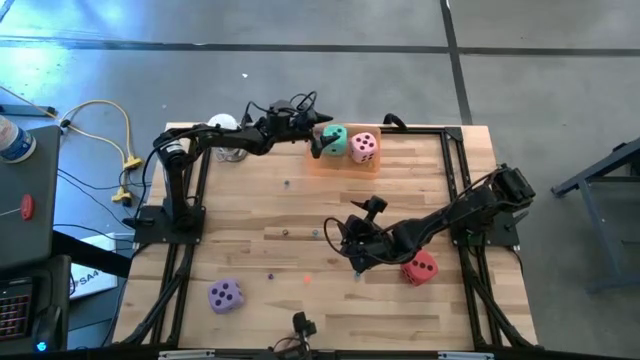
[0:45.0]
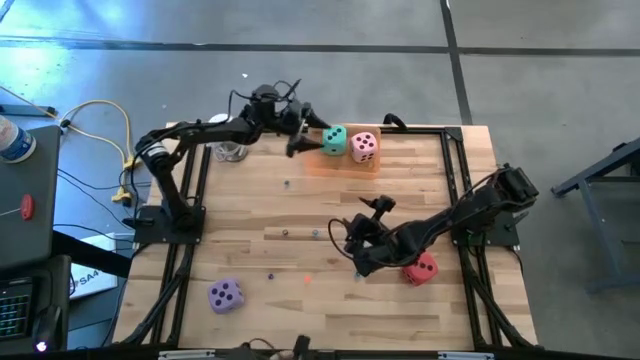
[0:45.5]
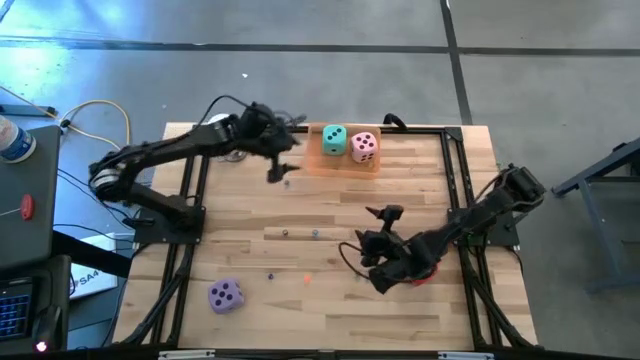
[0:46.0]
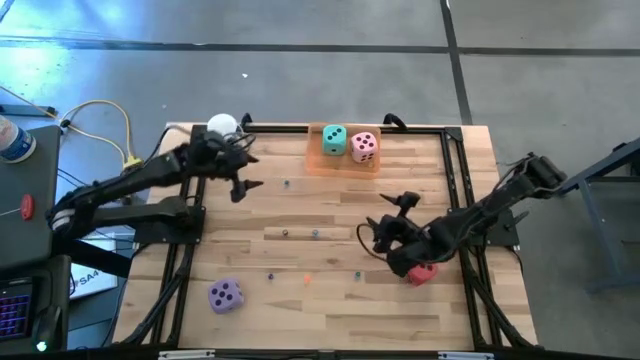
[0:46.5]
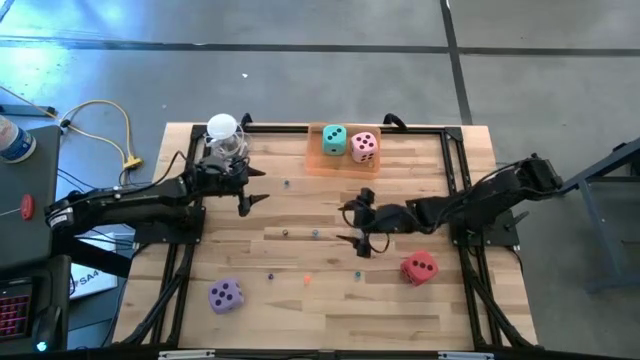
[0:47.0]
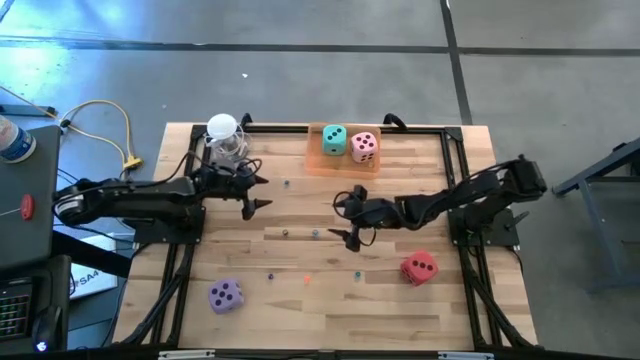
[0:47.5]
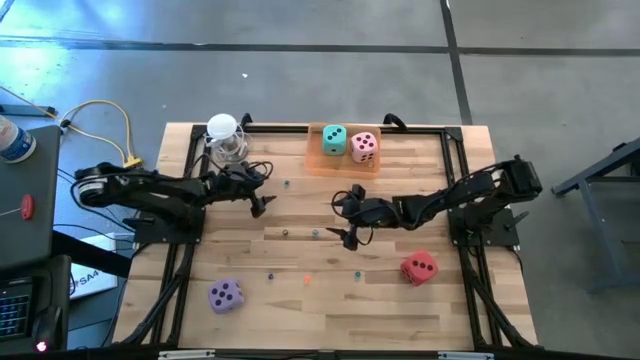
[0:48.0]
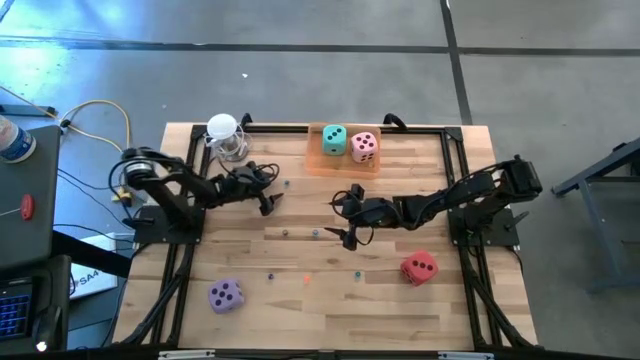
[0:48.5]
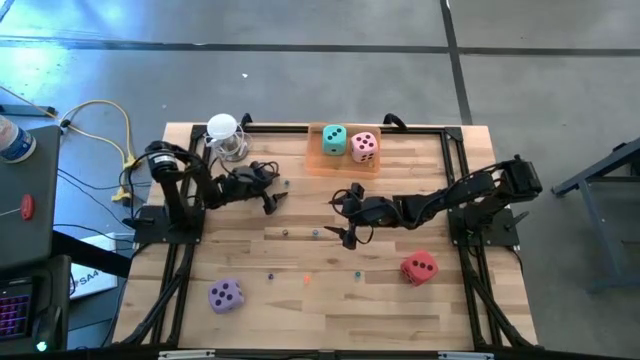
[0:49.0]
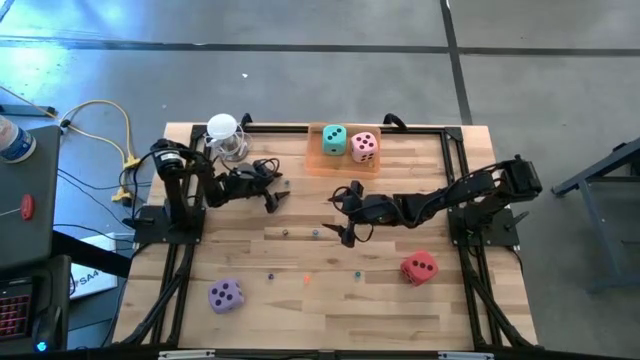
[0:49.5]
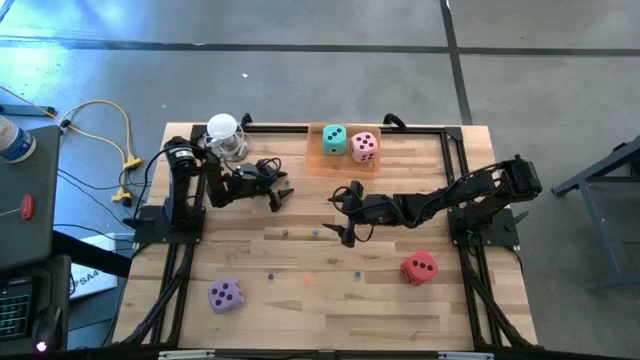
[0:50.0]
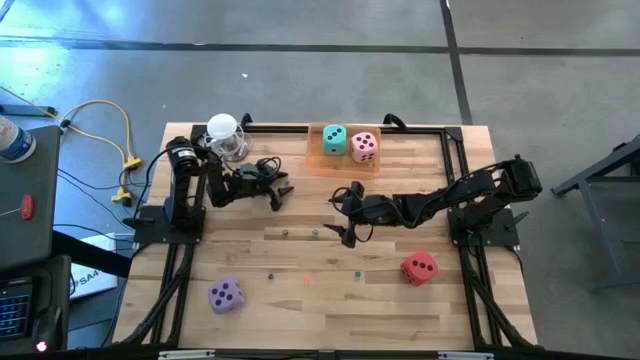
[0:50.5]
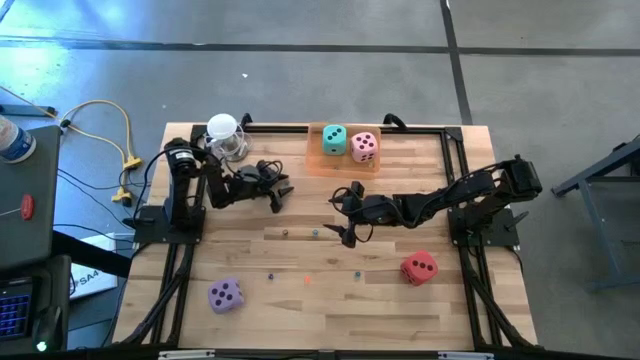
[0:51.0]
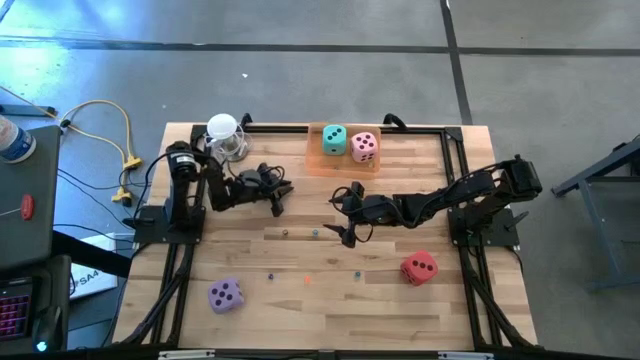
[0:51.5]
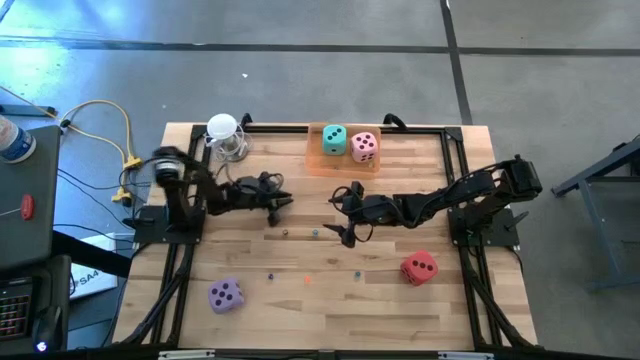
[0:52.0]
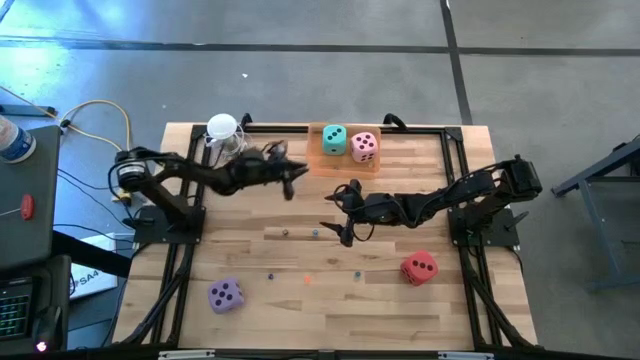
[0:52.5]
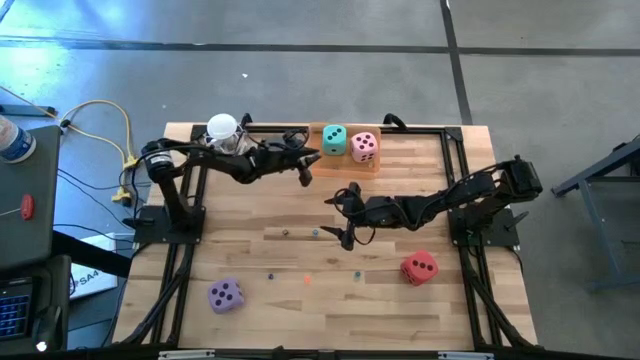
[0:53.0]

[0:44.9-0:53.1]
Task: Pick & Place Dice
Put the blue die into the orange bin

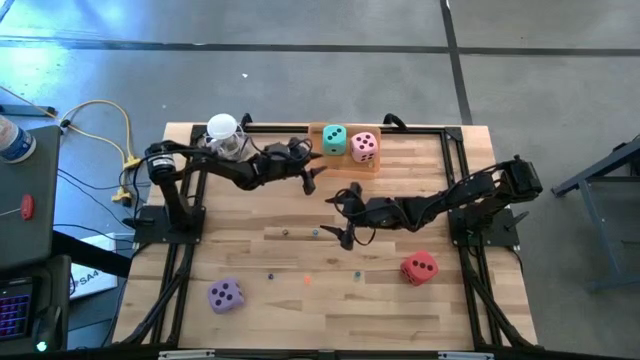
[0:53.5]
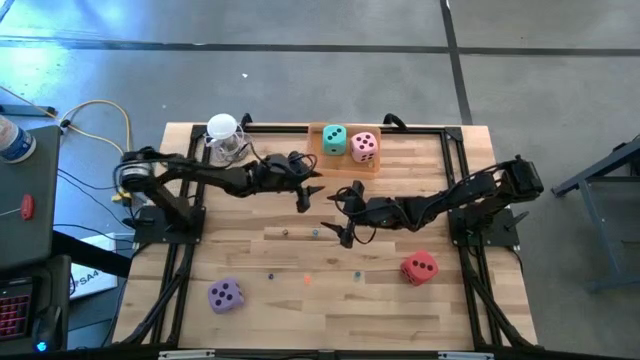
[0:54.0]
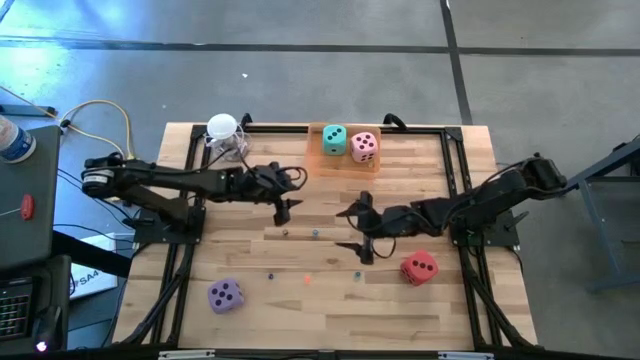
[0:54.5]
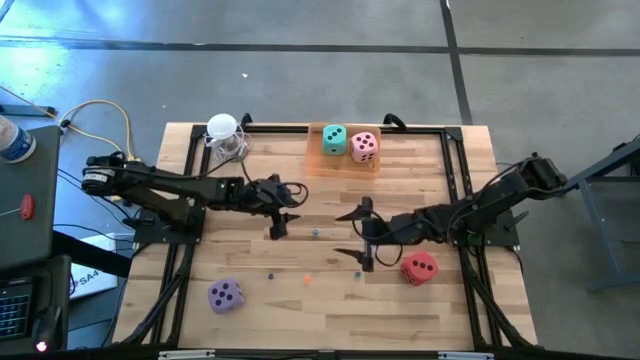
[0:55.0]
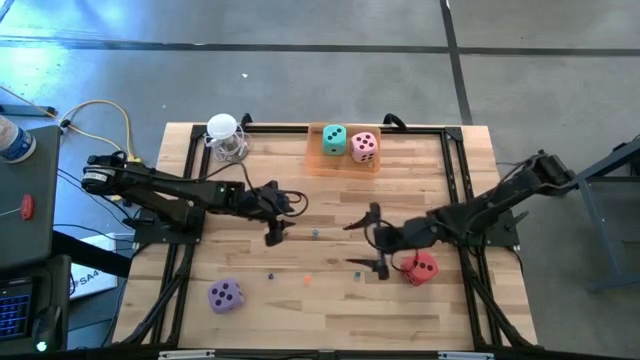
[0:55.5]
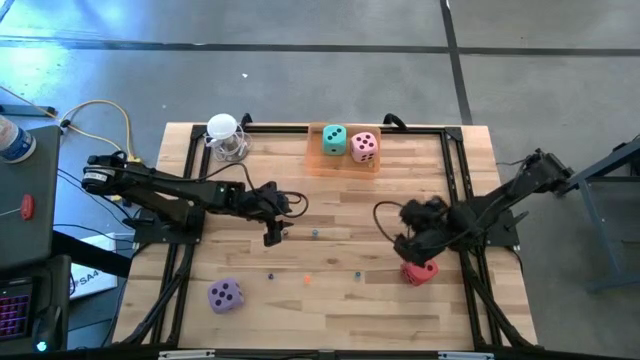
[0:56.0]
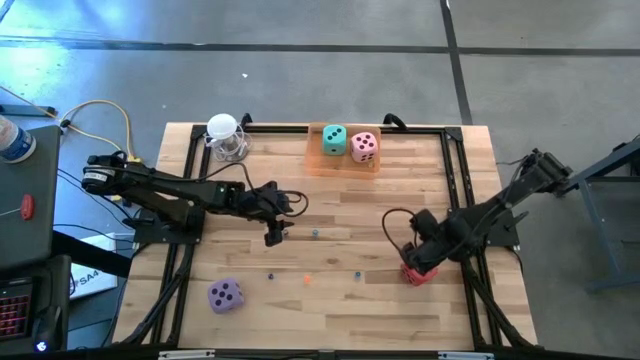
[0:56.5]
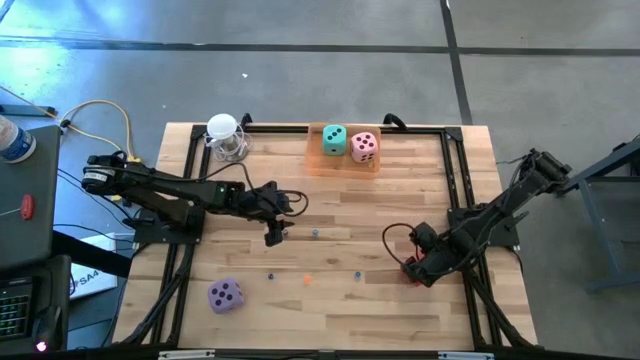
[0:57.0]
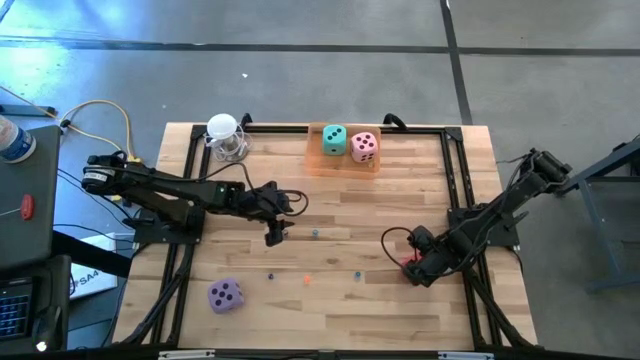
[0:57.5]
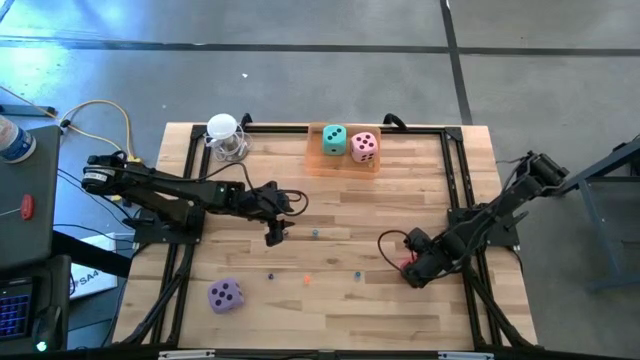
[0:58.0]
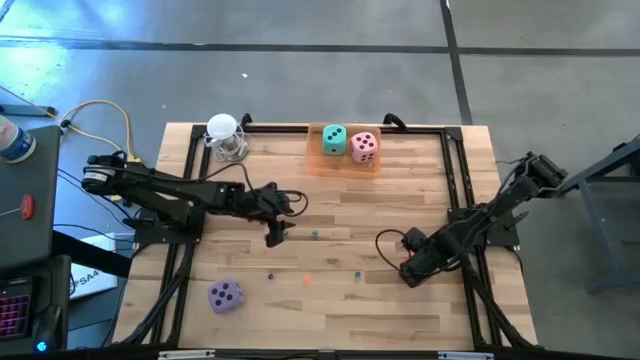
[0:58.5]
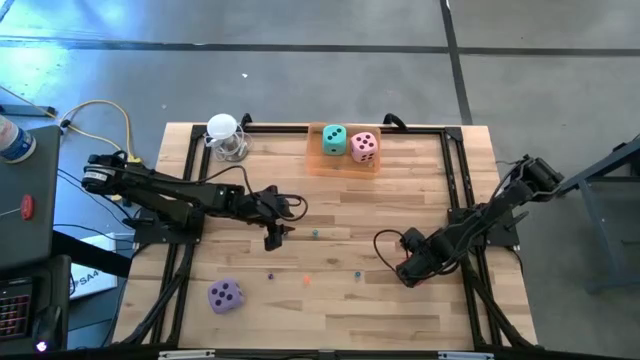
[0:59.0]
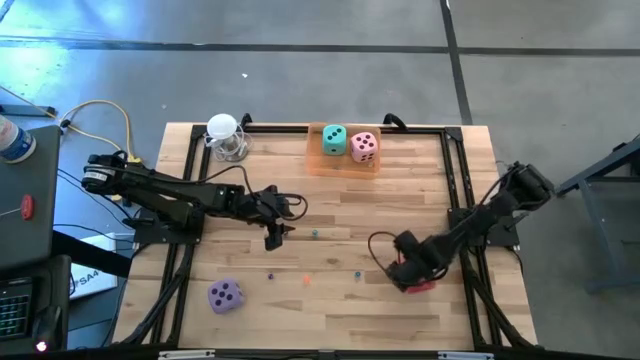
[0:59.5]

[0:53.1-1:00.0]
Put the large red die into the orange bin

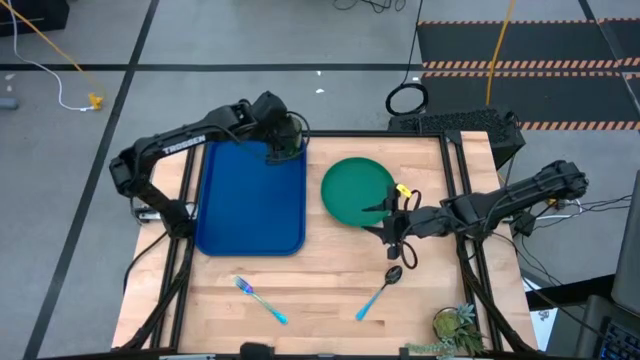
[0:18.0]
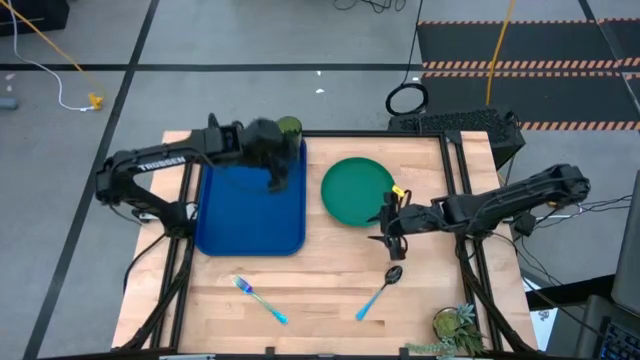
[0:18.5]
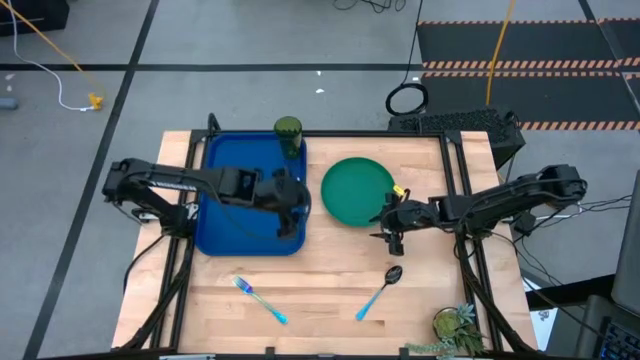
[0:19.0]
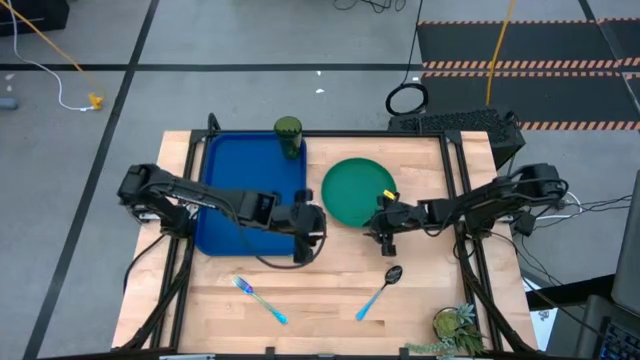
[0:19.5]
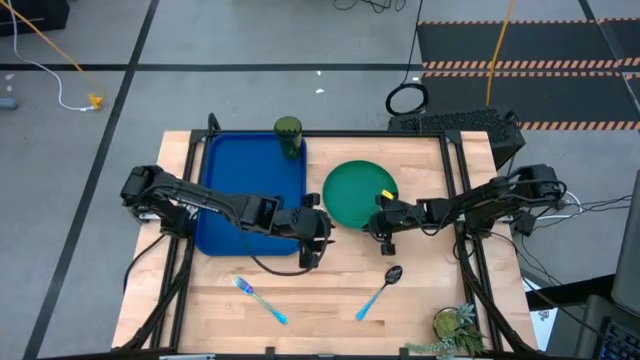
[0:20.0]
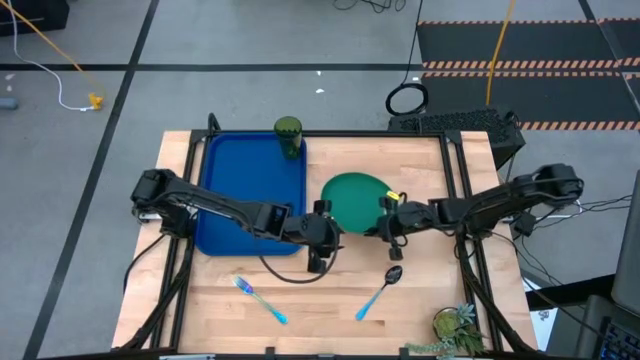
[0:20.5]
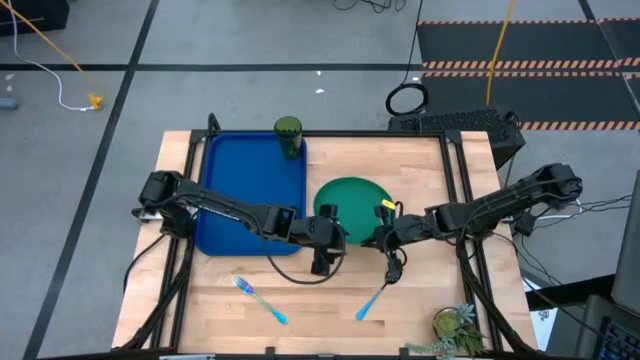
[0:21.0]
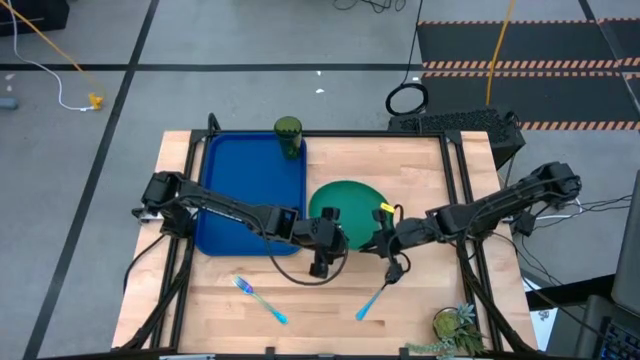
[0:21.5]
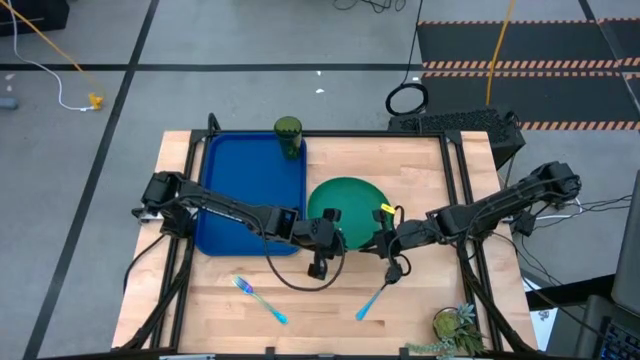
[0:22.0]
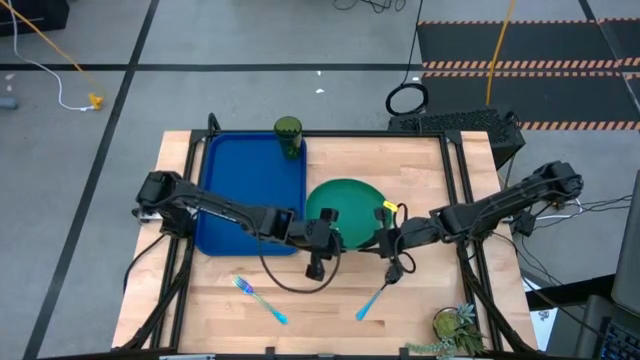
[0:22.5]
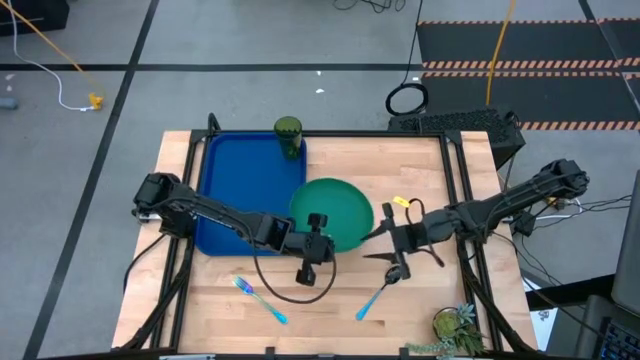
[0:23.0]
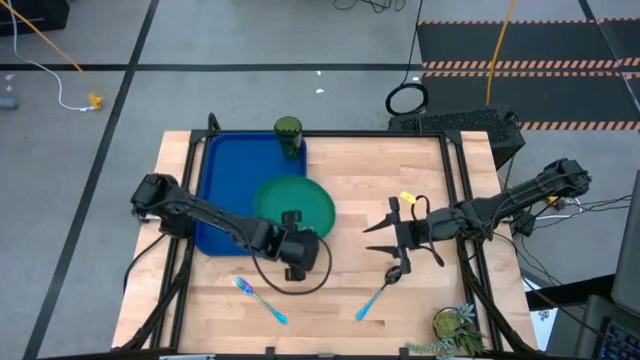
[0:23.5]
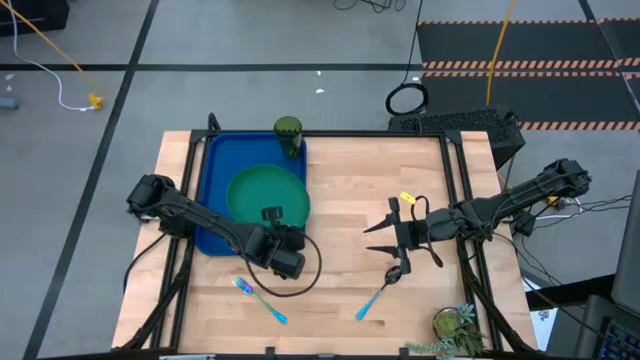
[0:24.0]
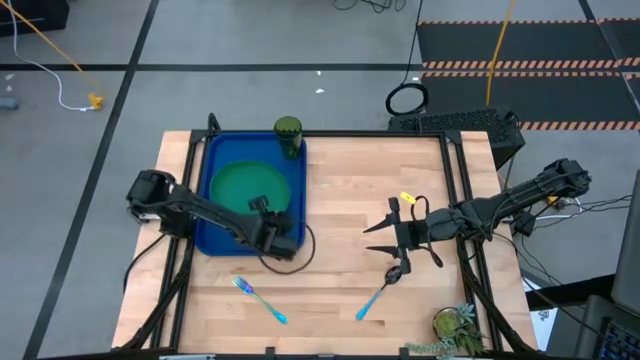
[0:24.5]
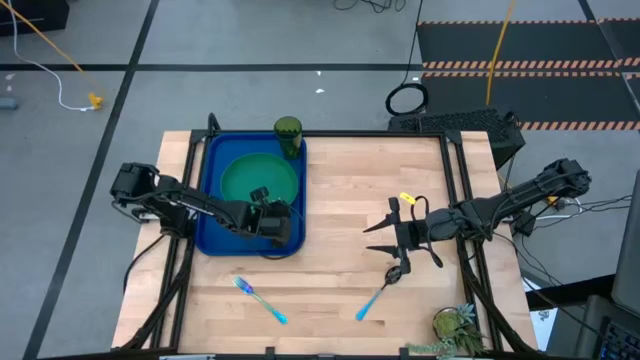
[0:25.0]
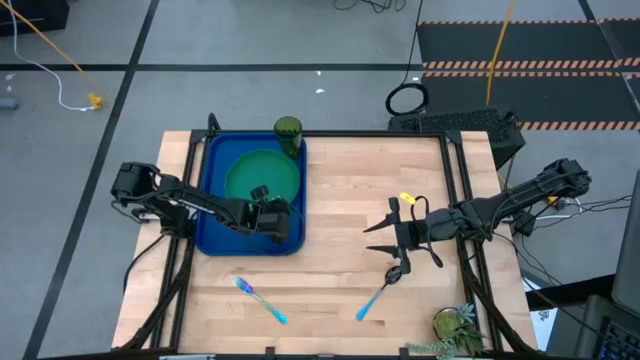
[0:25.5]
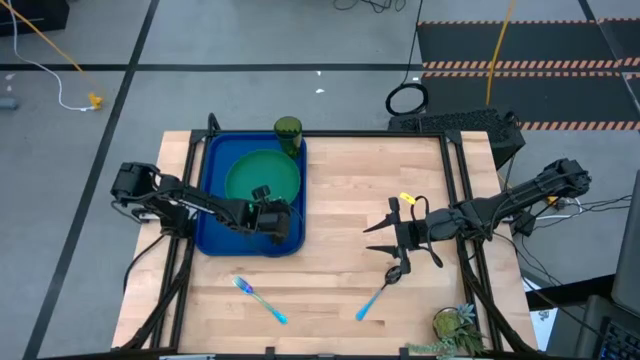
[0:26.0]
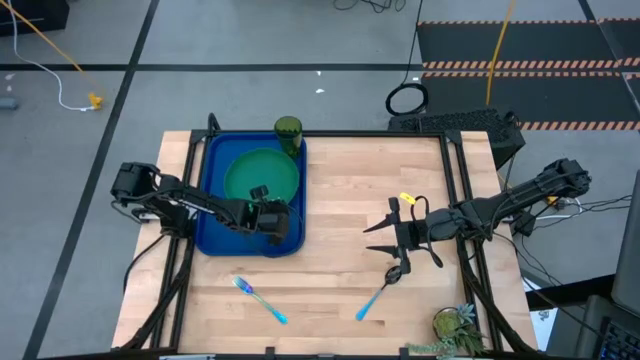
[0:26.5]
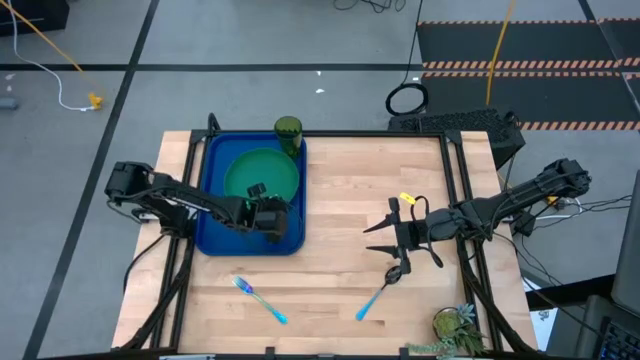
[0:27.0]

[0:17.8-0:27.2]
Task: Pick and place plate/cup/fork/spoon on tray
Put the green plate on the serving tray
